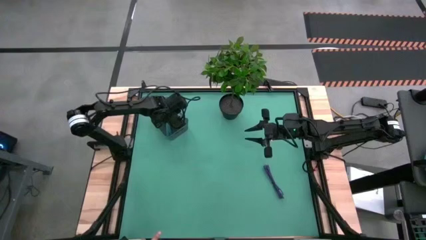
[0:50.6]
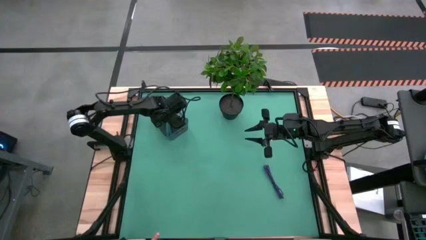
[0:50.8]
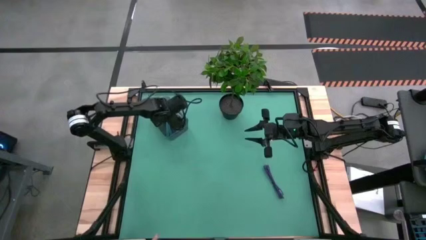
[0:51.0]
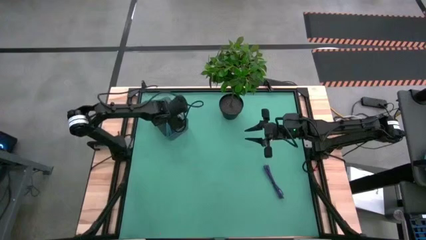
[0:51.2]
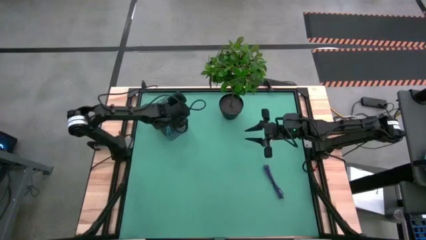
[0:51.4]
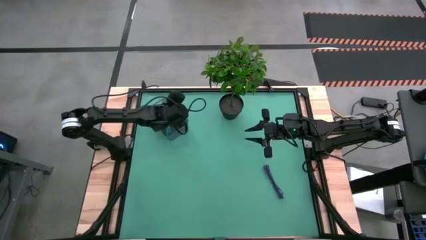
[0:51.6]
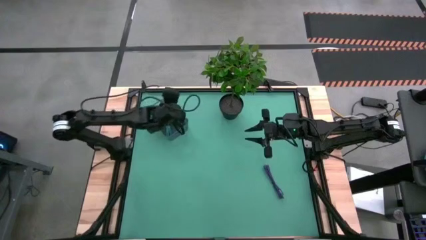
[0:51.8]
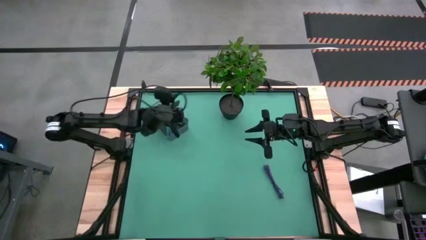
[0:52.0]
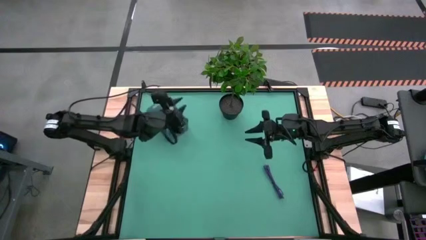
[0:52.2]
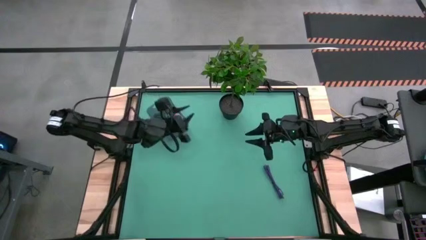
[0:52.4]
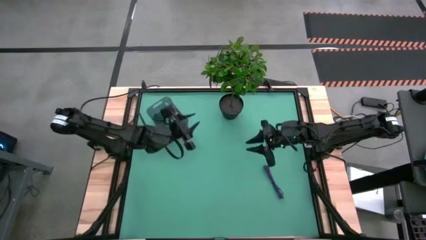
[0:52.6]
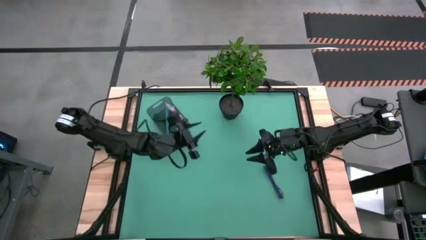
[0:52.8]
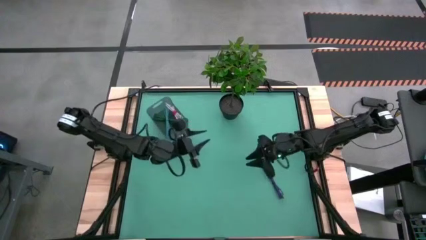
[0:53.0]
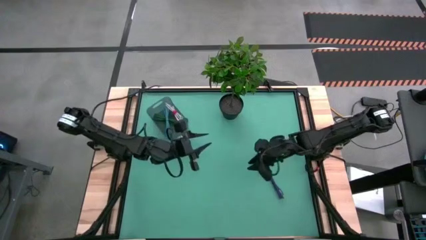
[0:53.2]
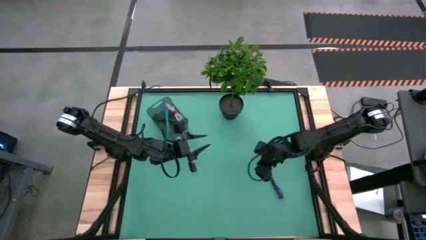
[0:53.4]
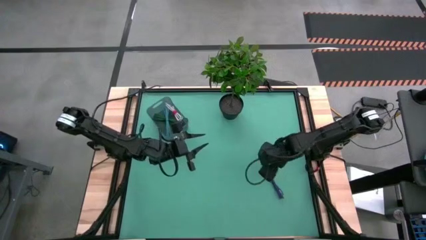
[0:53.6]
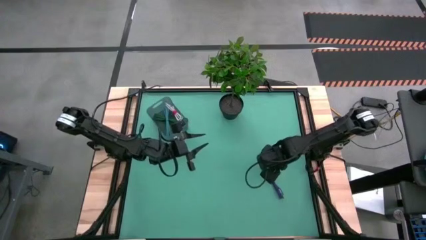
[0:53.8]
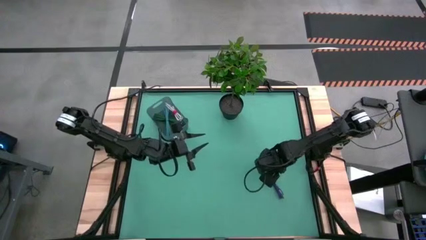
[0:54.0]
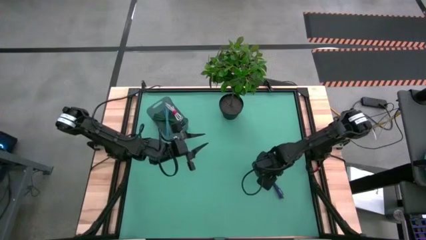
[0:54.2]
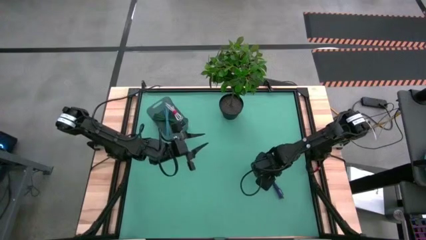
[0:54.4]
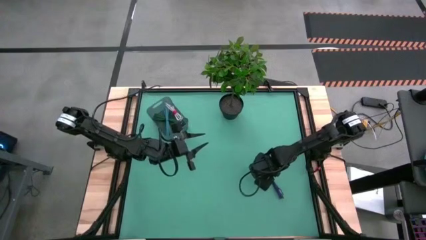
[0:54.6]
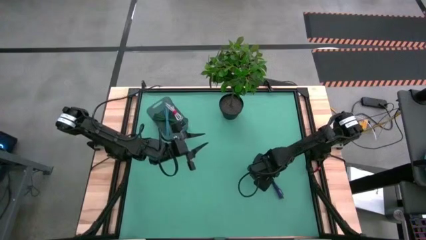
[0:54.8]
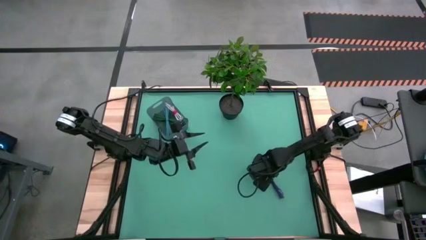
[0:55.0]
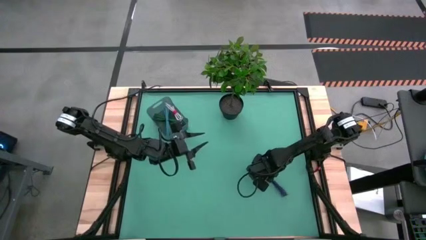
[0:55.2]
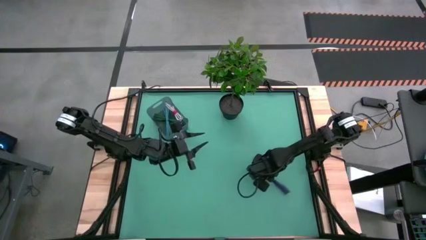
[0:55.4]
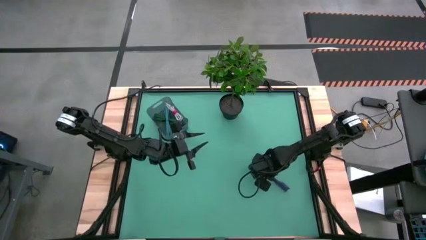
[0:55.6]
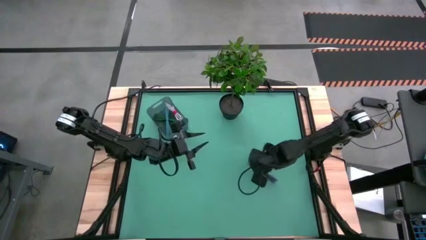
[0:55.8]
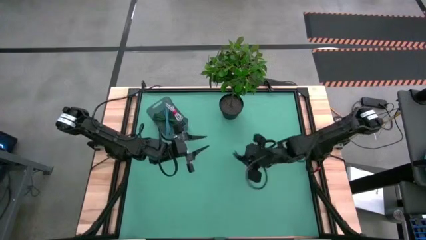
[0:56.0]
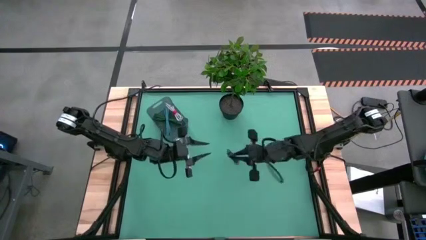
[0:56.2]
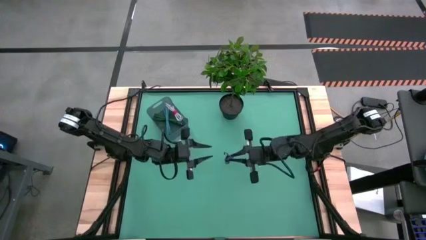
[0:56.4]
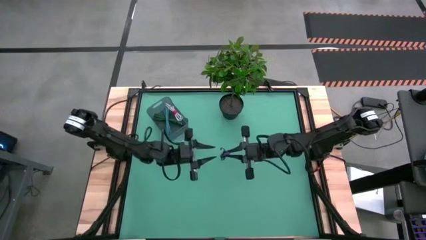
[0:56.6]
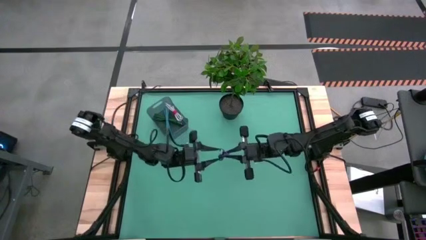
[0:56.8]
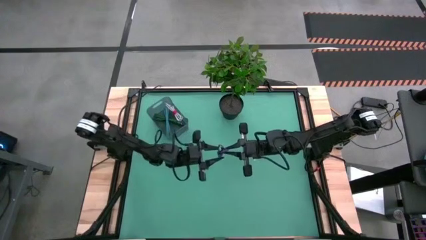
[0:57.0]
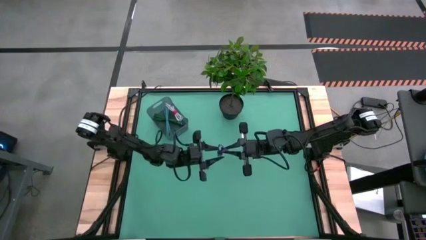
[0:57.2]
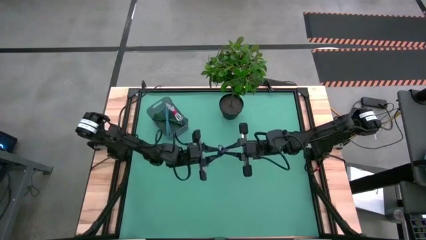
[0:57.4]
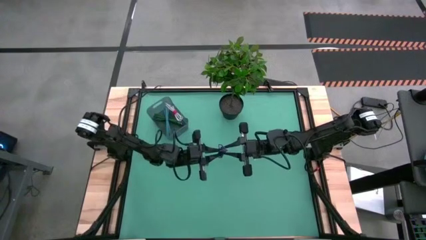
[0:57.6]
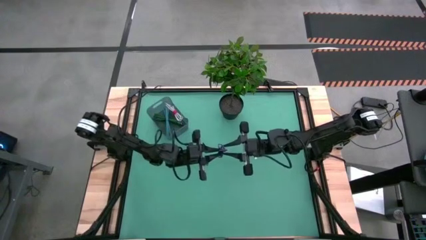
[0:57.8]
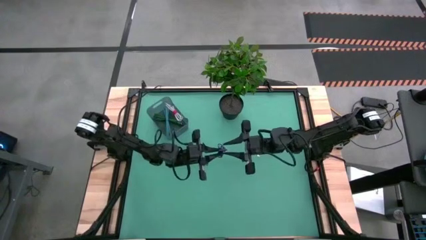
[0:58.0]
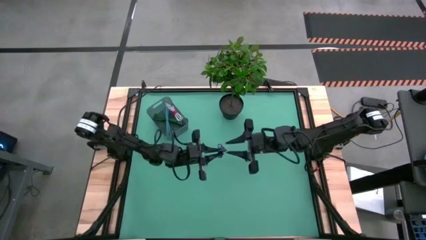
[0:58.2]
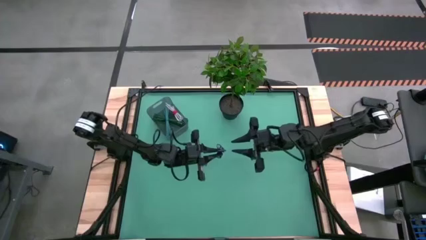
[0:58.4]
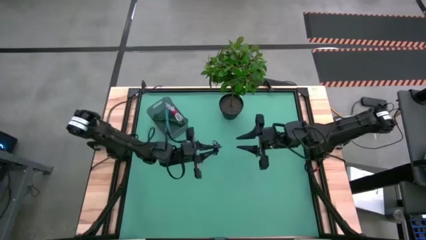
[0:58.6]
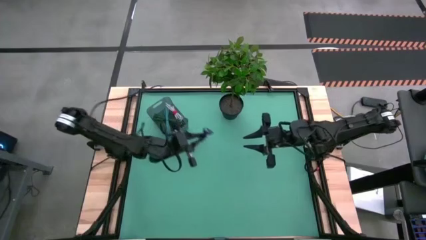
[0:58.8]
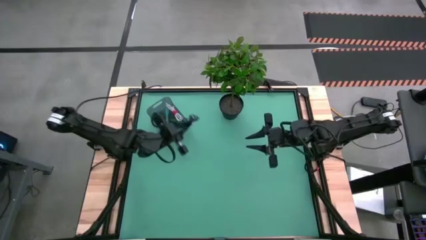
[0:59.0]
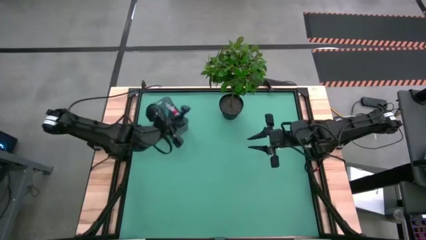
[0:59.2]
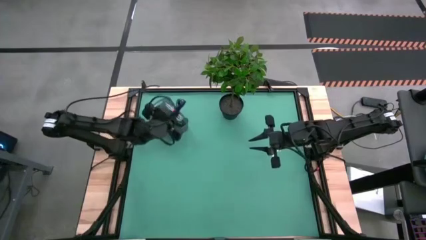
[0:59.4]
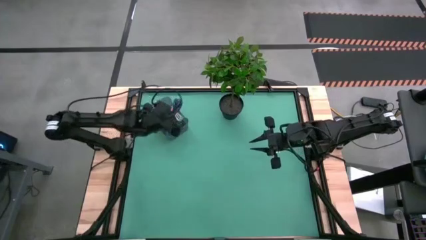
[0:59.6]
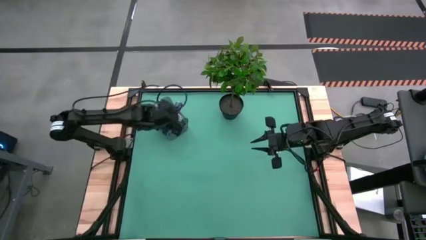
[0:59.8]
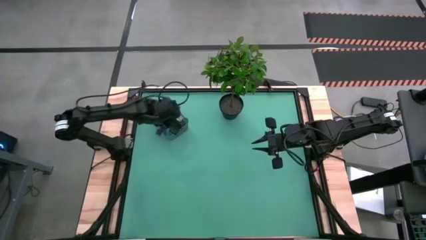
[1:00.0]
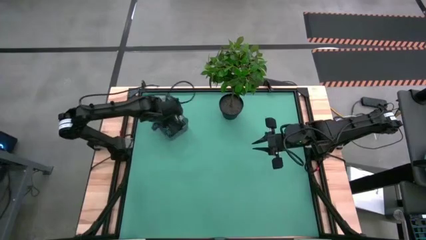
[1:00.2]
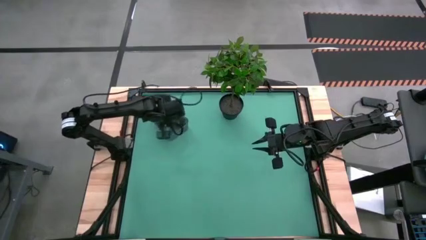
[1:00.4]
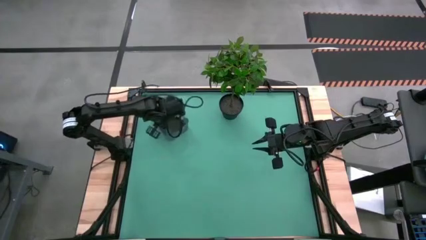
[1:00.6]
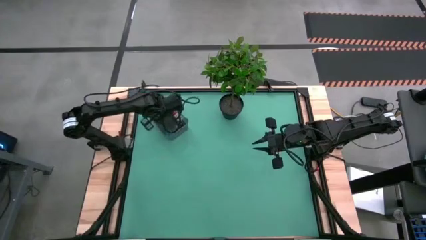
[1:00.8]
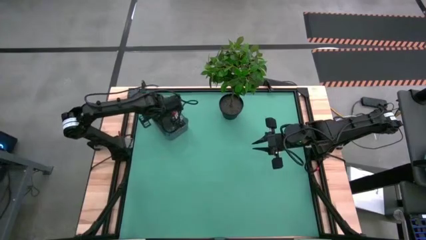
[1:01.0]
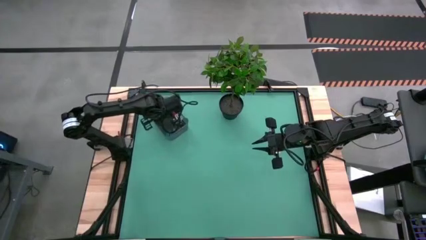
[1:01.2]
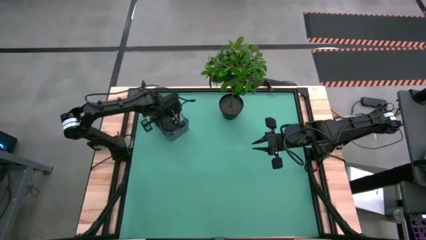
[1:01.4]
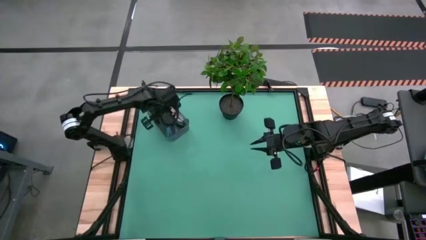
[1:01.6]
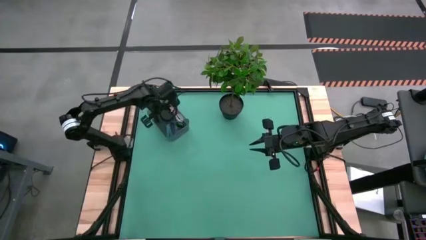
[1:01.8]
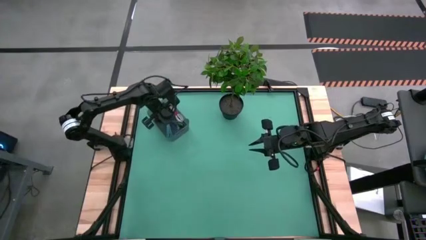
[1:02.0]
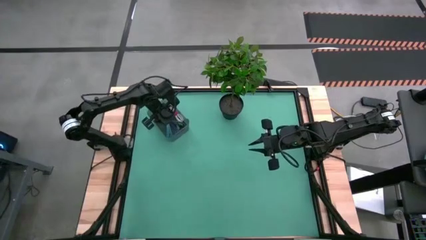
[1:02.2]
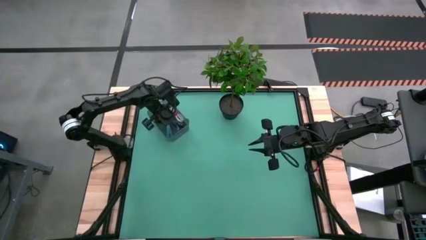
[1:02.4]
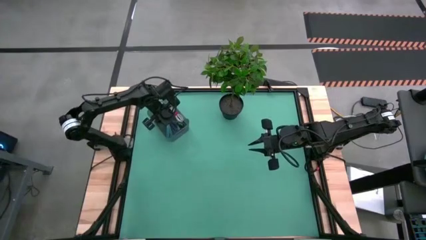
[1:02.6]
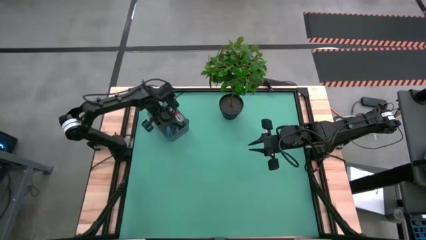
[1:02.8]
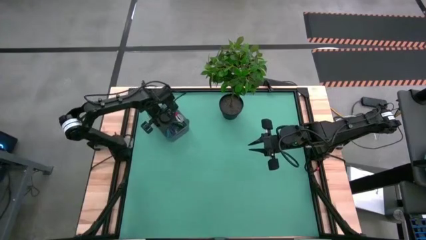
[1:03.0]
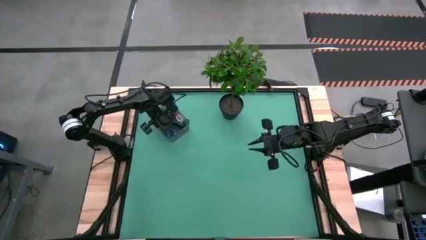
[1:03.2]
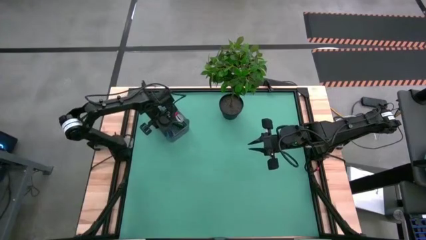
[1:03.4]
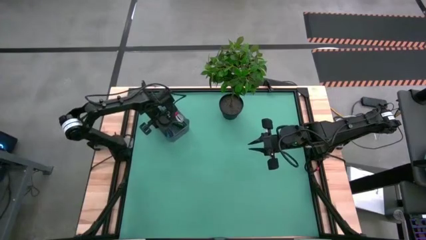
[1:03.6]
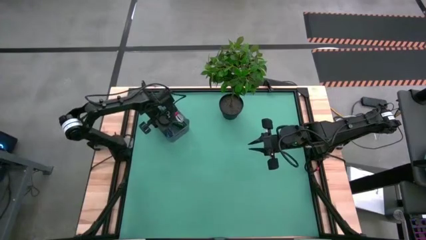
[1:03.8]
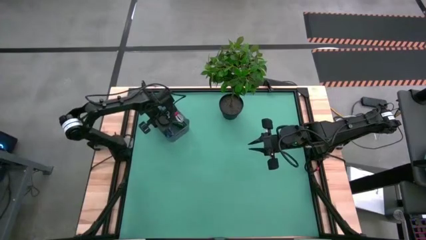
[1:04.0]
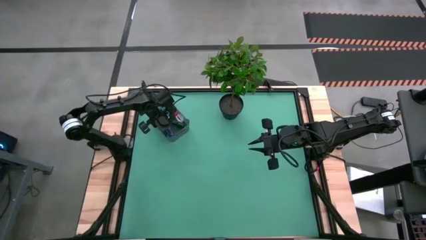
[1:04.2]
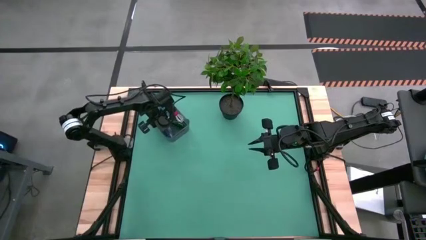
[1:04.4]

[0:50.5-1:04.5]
Task: Pick and place USB-C Cables
Put the purple charger cable into the gray bin

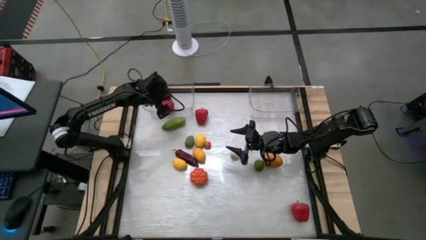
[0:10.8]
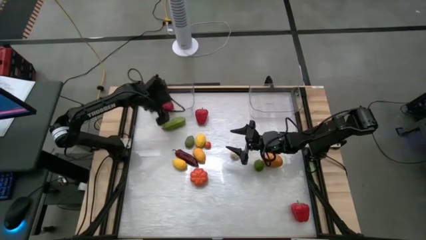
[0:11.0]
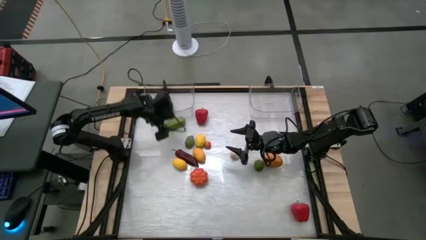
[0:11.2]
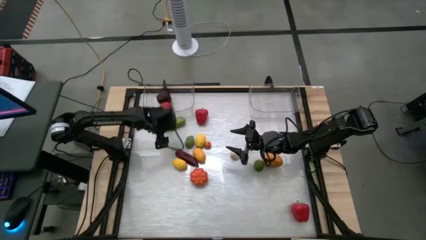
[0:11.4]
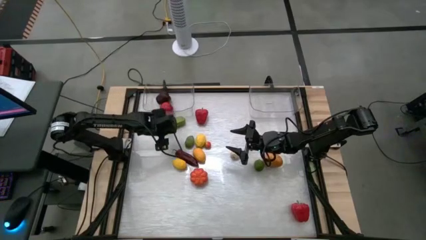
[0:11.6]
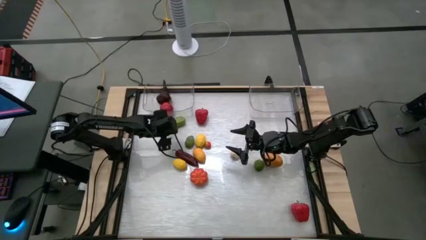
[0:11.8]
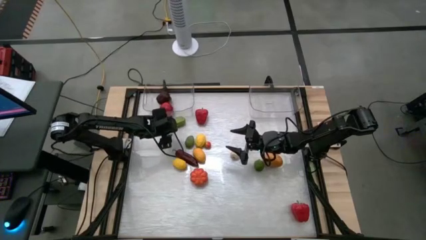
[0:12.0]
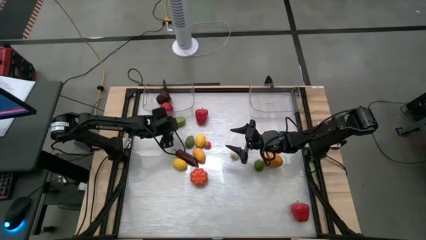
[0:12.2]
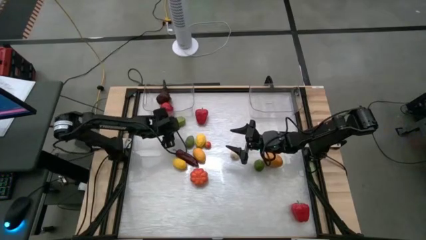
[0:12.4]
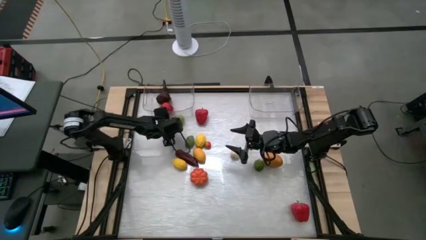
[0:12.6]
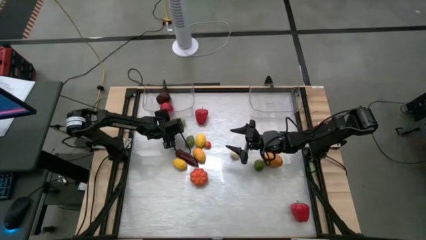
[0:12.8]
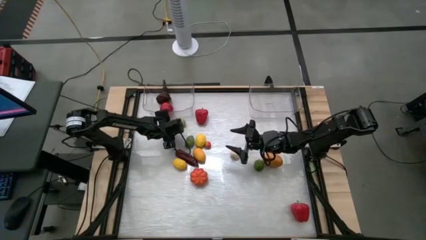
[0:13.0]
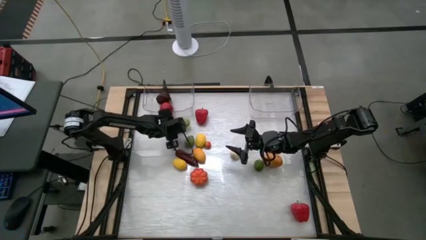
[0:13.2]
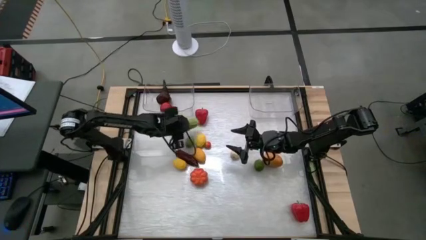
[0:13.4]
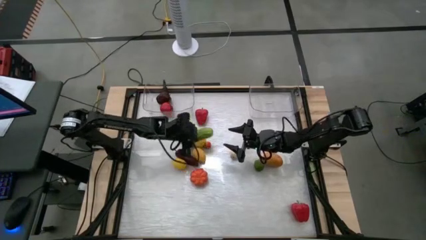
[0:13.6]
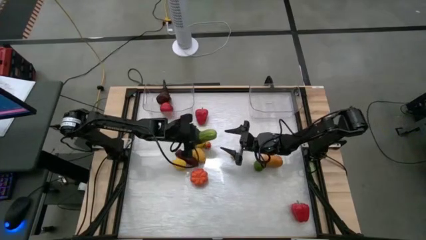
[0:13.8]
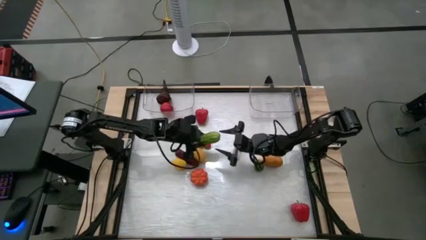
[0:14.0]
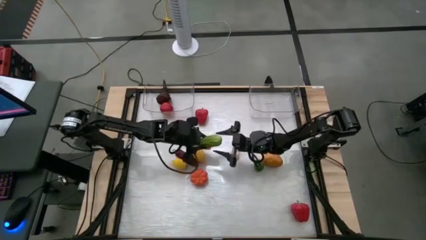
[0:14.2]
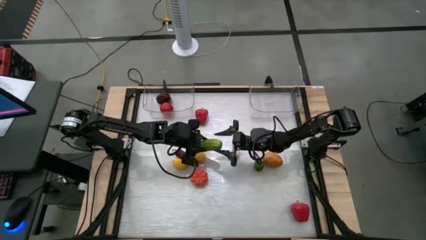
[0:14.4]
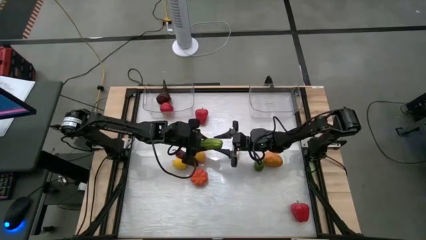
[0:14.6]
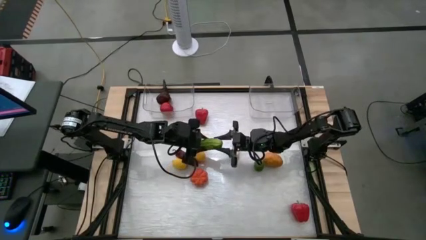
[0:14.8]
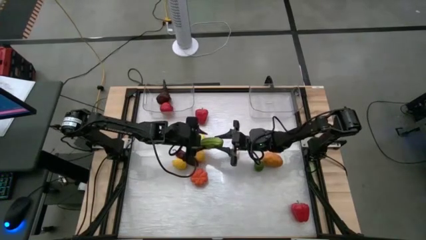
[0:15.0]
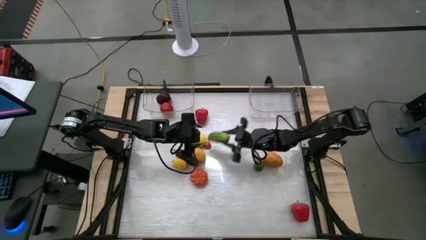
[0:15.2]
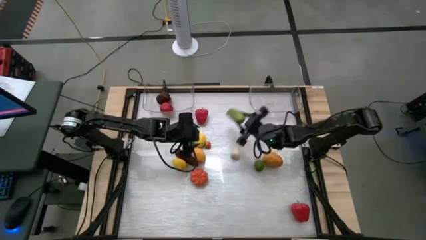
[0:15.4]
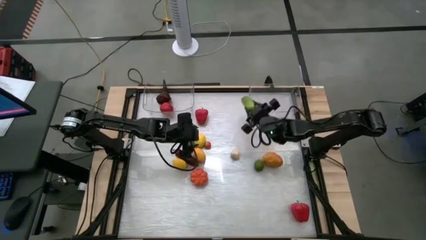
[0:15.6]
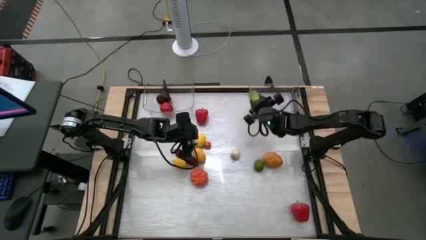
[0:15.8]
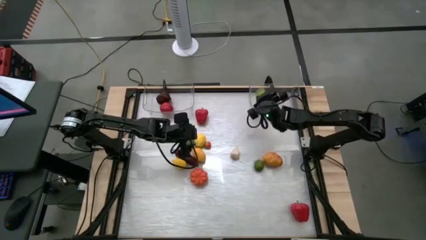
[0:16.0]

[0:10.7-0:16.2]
Task: Sort produce into baskets
Put the green cucumber into the right transparent bin
